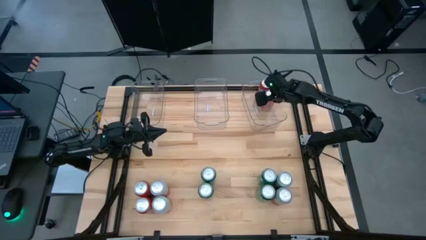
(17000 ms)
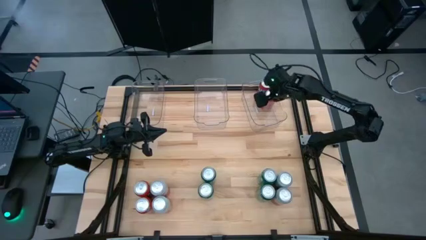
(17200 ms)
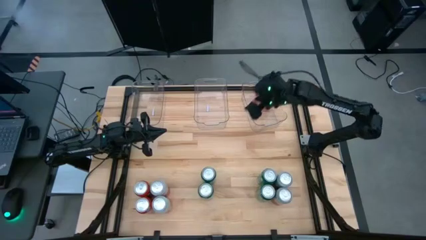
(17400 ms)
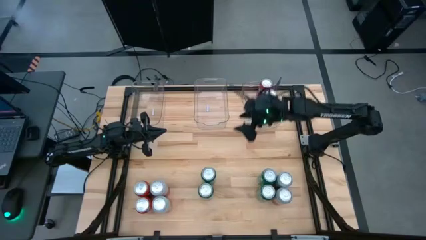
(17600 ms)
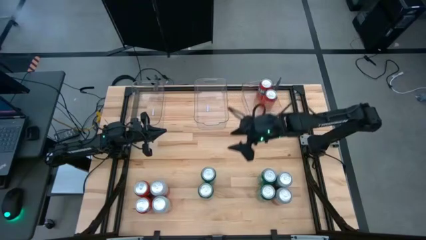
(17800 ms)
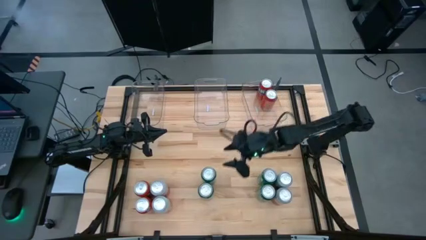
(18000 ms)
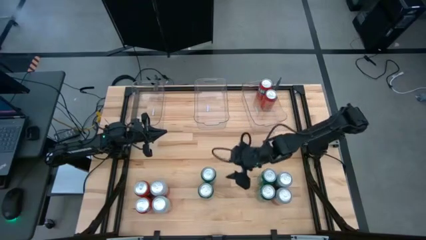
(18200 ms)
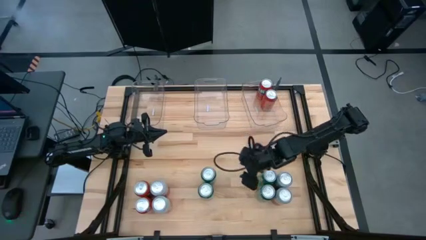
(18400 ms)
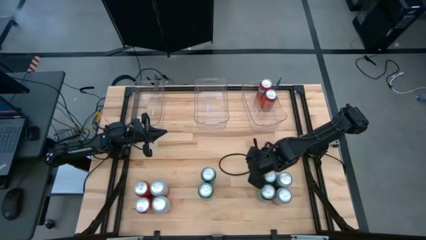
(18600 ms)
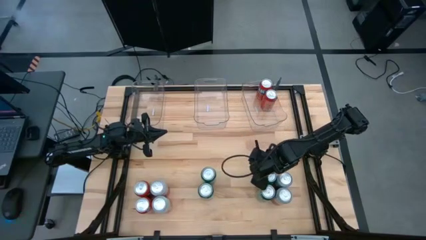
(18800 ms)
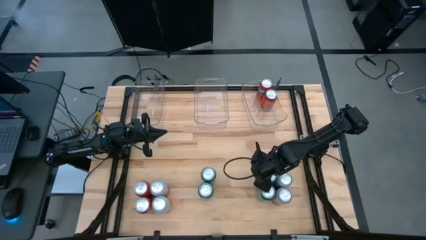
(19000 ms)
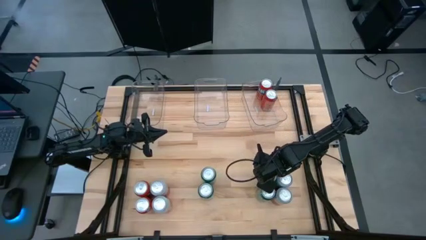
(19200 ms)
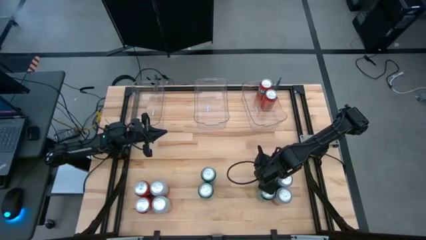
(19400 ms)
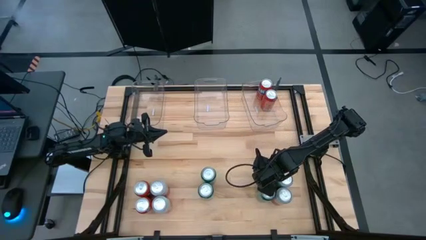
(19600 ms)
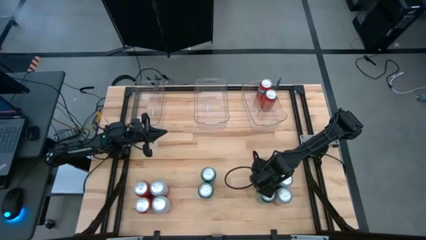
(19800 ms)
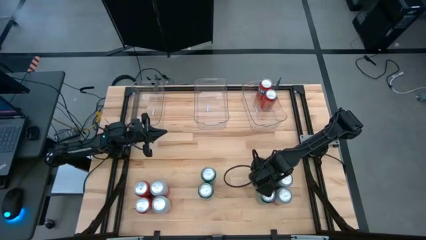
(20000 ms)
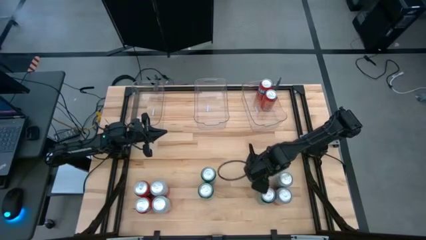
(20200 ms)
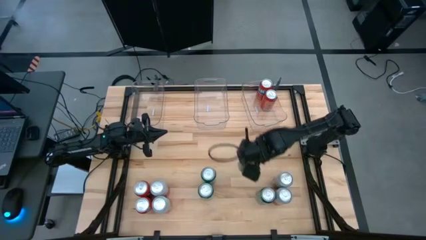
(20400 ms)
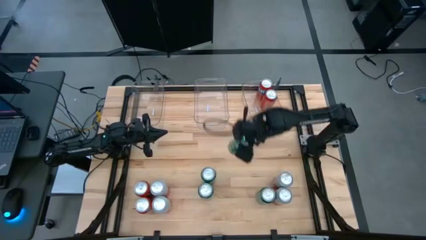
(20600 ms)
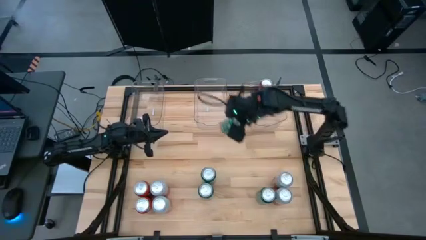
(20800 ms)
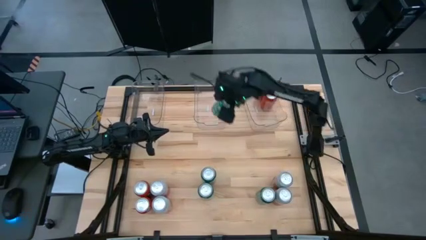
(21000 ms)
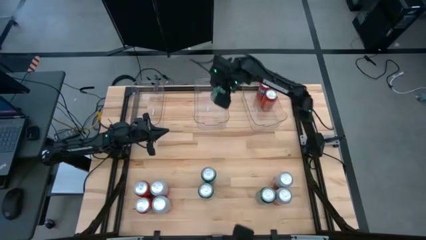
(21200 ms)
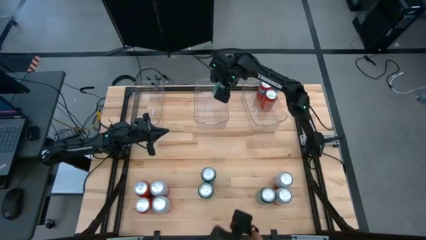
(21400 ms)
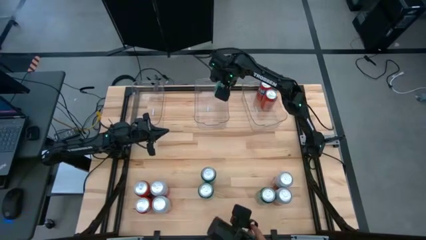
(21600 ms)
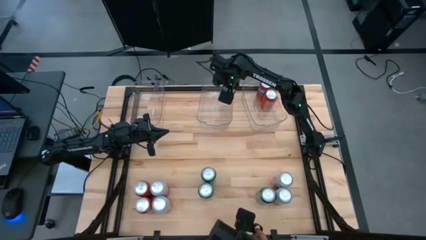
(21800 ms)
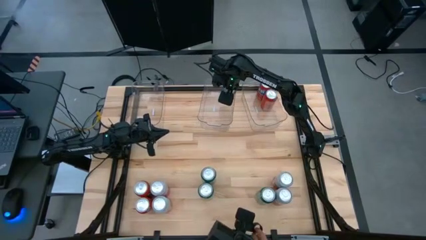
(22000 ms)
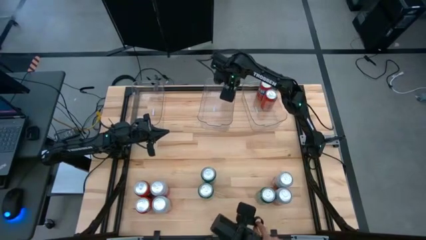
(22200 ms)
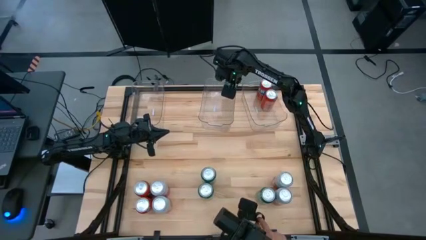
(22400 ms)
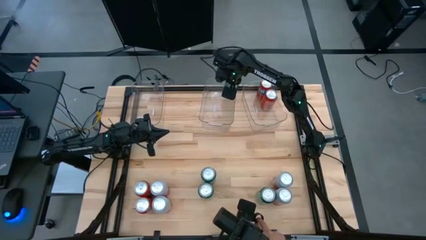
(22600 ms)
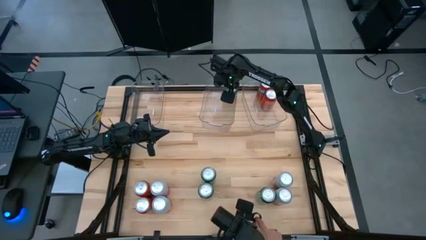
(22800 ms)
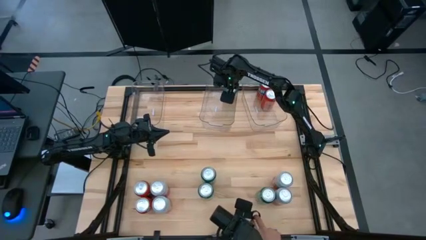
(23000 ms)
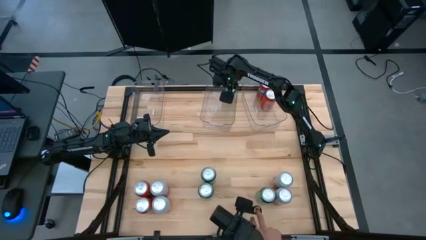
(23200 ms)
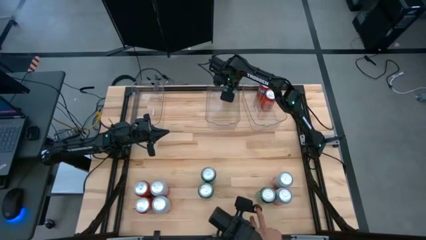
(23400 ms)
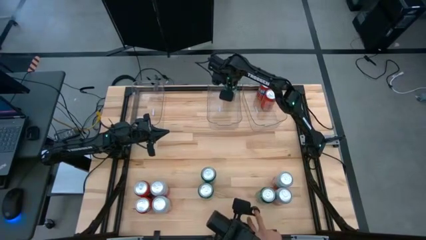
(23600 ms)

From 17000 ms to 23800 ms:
Task: Sort soda cans
Put the top right green soda can into the middle transparent bin

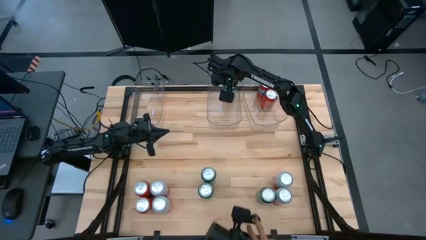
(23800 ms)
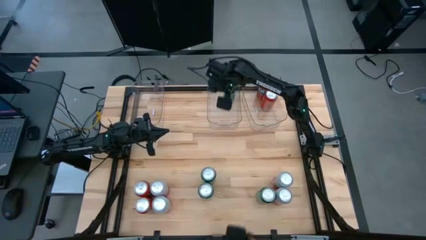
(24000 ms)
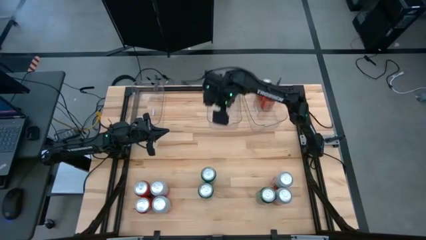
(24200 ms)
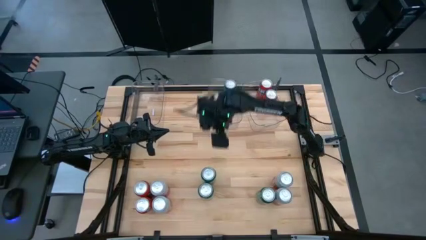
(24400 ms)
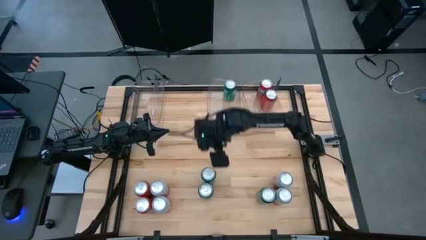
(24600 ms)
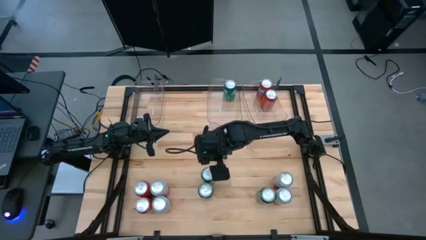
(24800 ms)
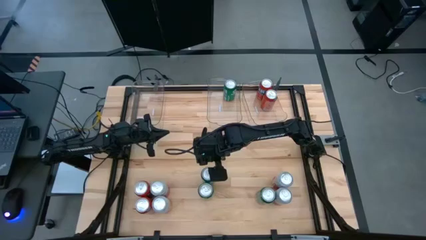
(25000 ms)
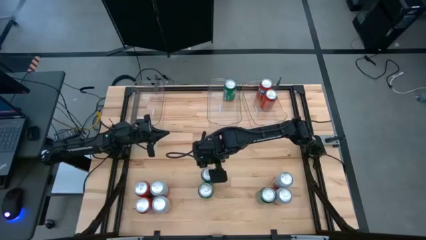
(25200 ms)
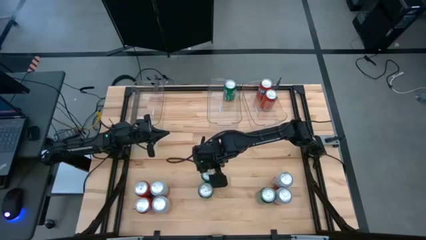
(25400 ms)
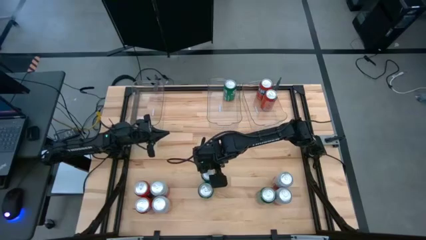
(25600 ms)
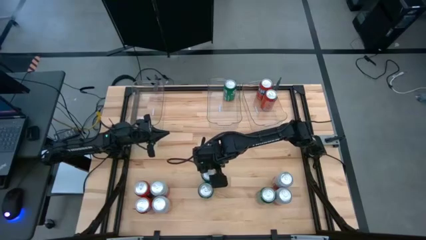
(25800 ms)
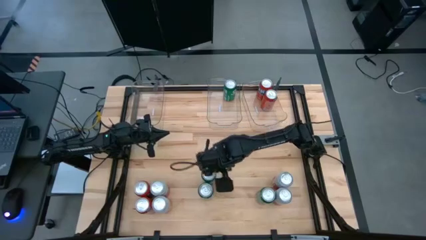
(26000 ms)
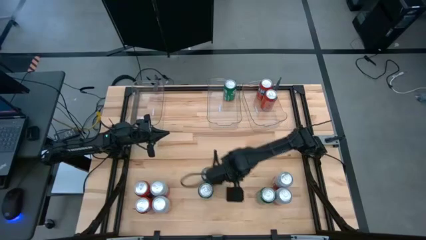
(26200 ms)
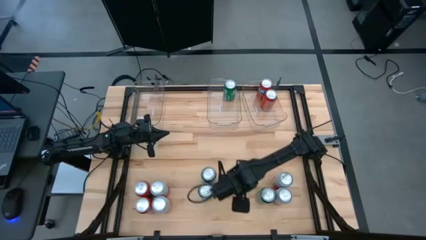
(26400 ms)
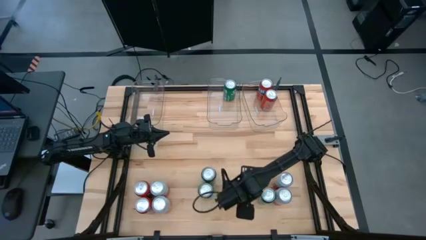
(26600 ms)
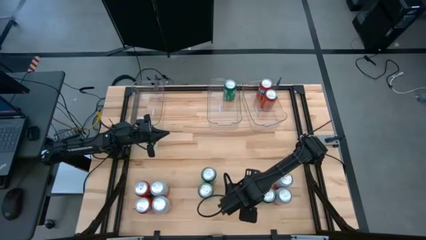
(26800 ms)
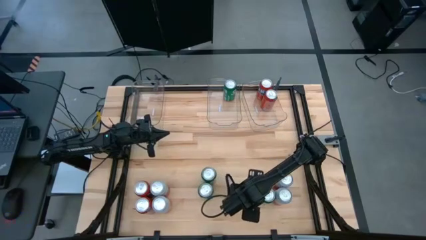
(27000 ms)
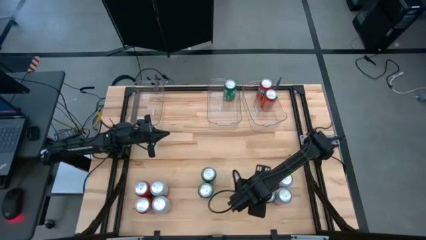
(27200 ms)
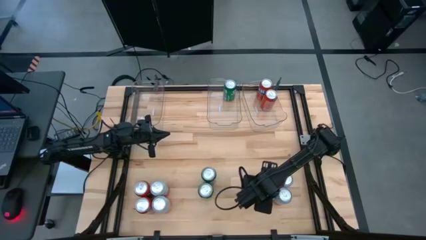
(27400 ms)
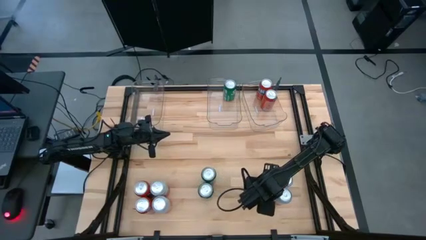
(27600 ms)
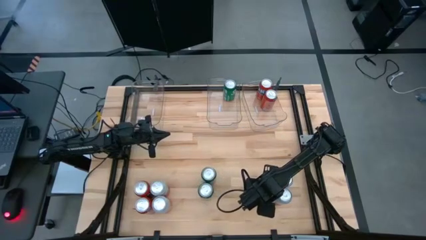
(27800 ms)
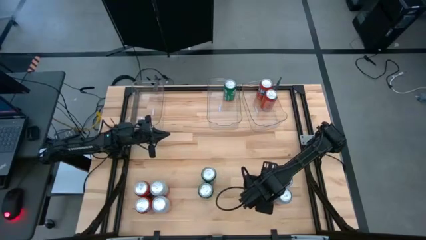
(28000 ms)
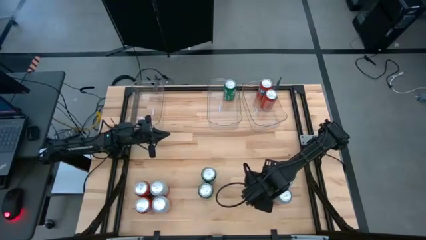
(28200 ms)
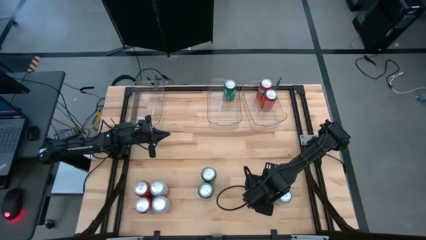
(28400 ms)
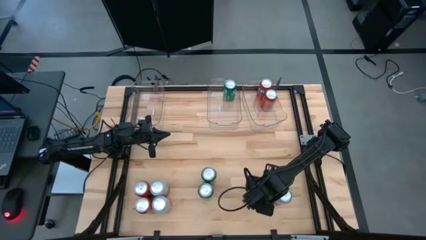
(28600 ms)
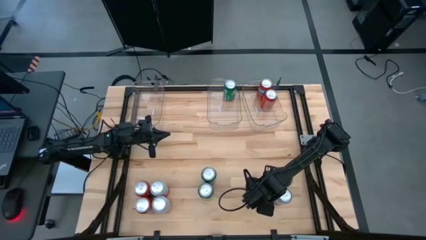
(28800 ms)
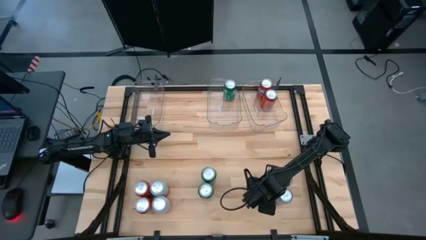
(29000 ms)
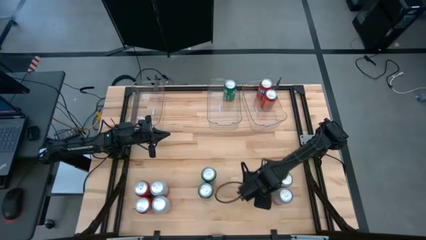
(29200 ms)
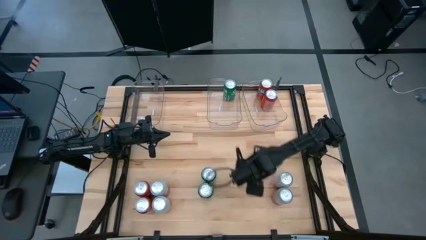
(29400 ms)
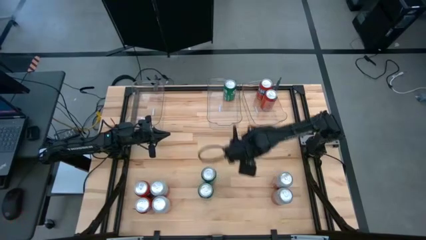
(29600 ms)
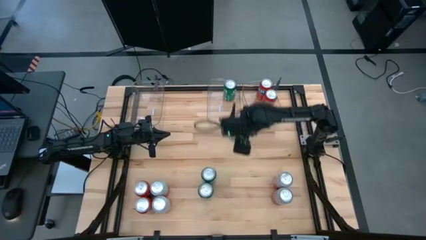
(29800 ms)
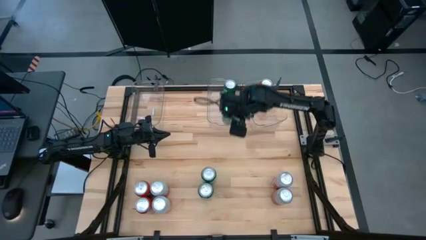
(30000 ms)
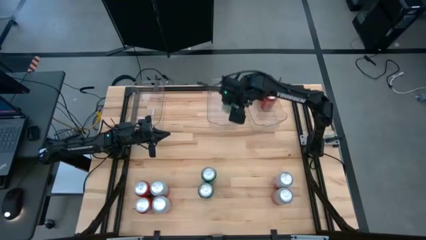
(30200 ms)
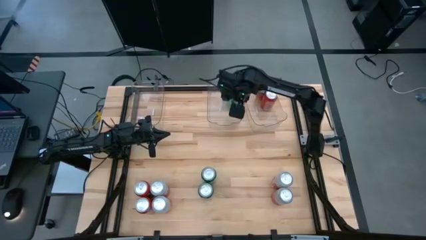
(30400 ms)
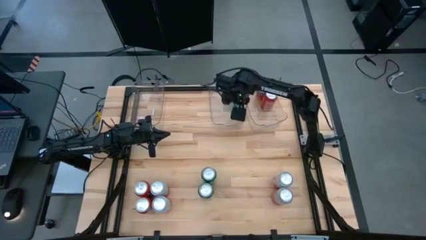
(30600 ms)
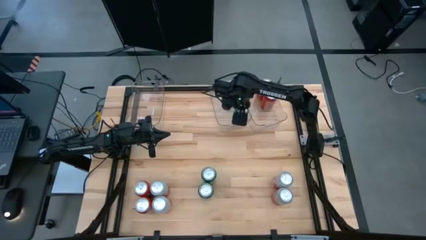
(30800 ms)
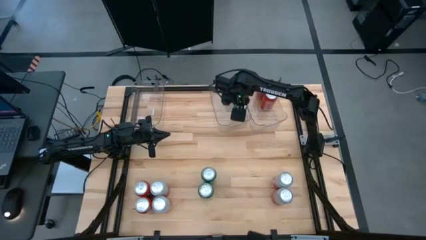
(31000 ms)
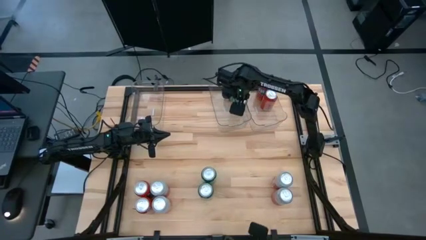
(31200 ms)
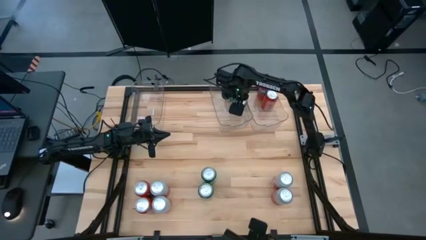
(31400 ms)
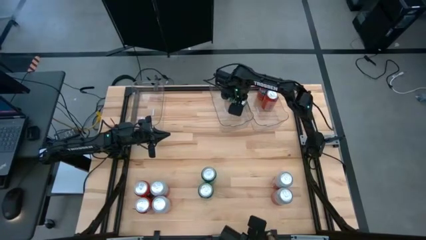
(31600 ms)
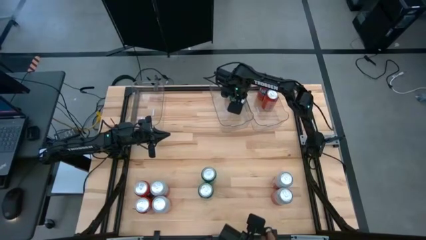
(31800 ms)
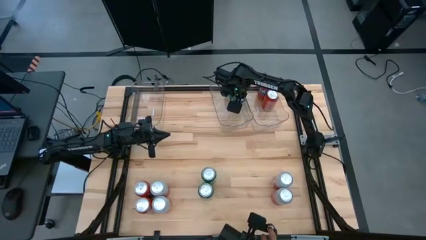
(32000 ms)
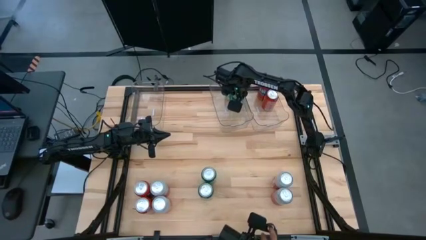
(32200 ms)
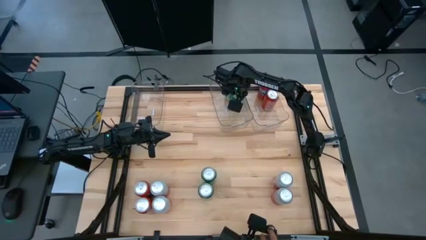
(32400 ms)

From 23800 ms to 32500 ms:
Put the bottom right green soda can into the middle transparent bin

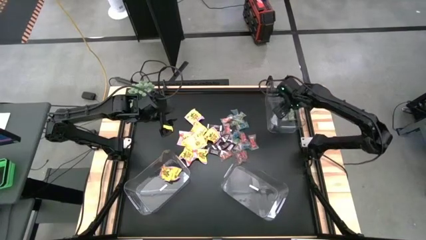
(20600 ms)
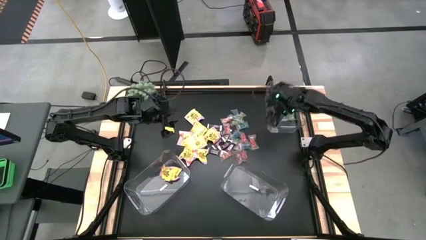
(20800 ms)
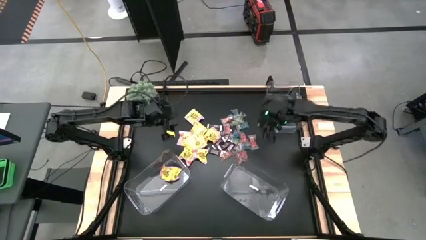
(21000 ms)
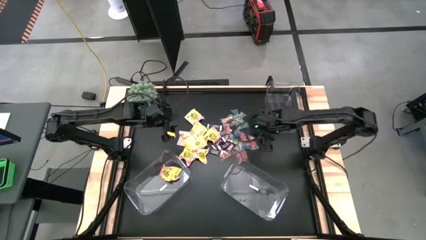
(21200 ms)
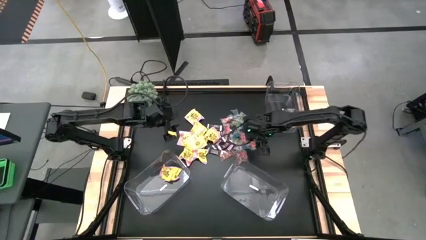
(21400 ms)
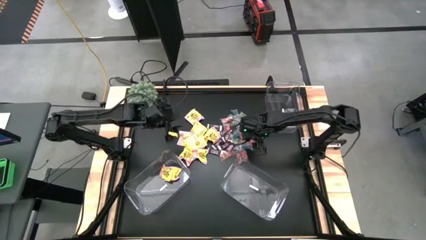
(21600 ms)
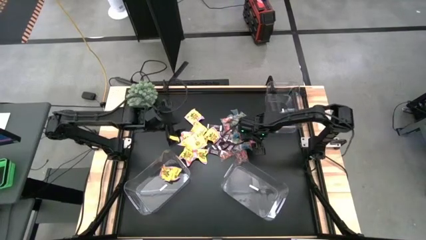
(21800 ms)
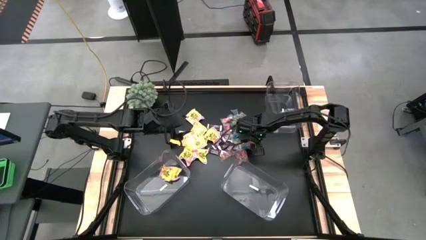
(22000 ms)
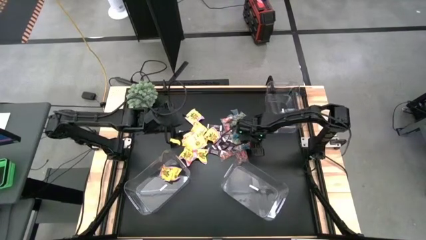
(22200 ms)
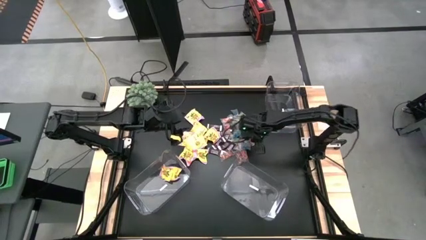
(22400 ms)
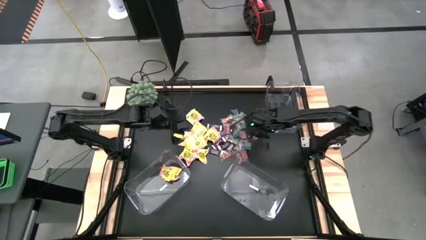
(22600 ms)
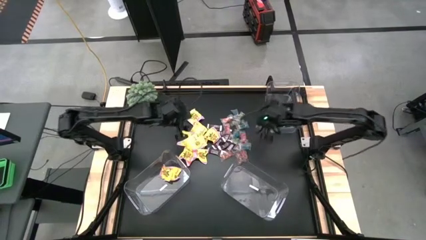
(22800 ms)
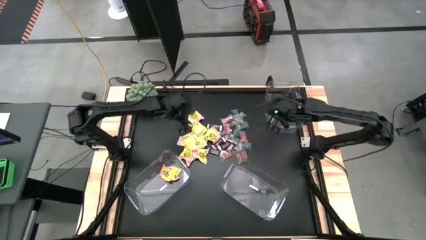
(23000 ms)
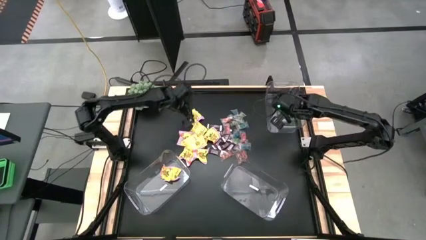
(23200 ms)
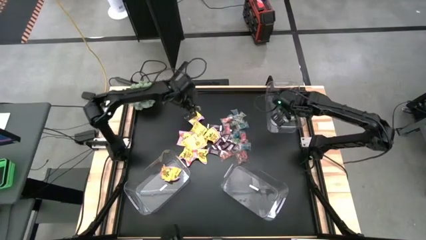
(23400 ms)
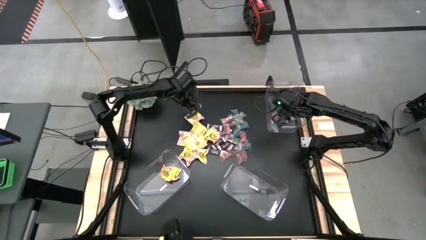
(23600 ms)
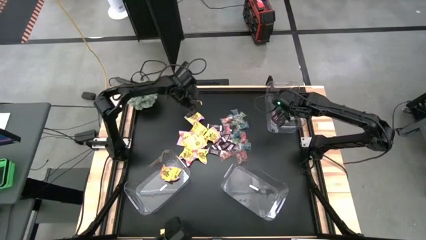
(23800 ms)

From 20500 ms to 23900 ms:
Task: Sort candy
Put the red candy in the top right transparent container
